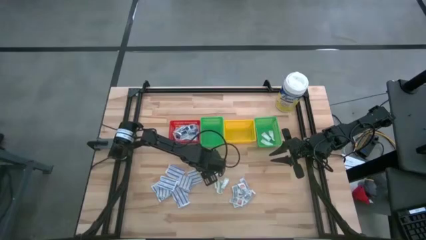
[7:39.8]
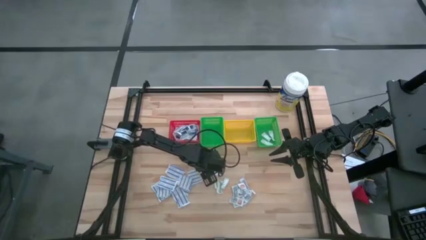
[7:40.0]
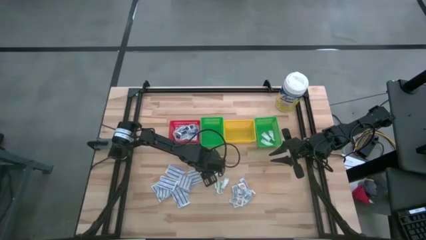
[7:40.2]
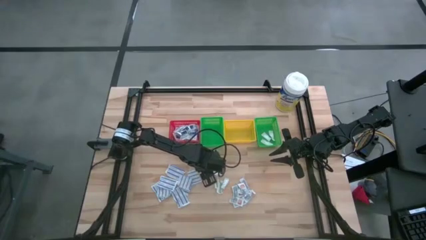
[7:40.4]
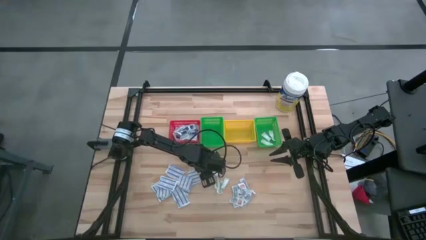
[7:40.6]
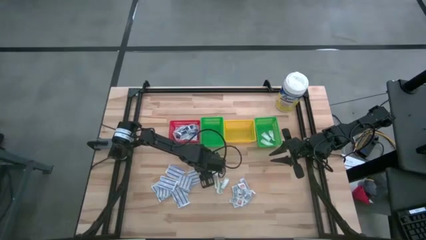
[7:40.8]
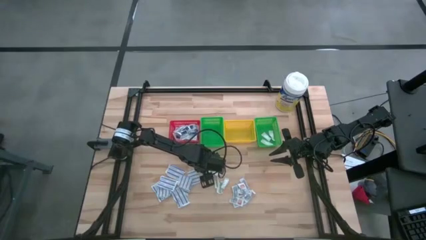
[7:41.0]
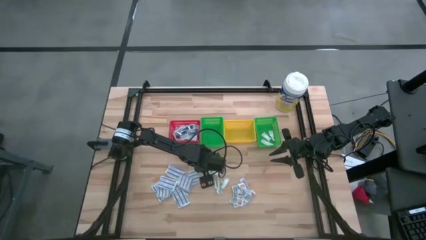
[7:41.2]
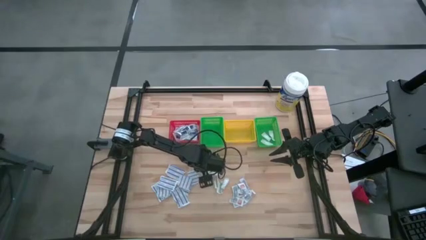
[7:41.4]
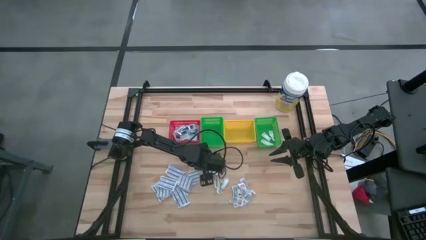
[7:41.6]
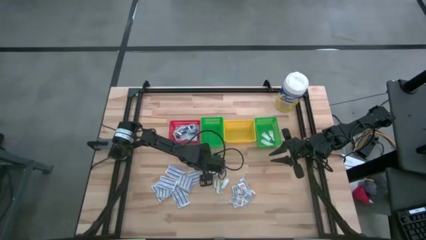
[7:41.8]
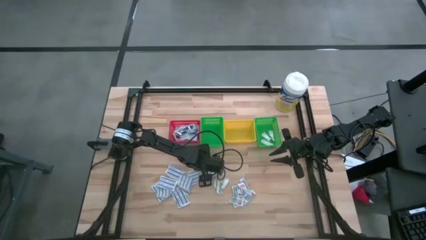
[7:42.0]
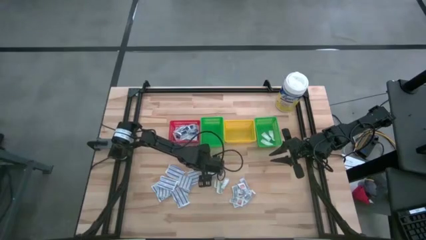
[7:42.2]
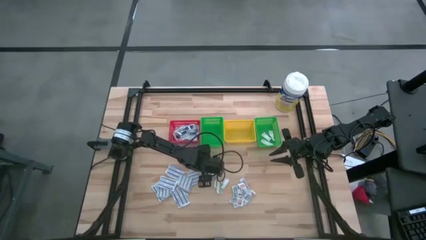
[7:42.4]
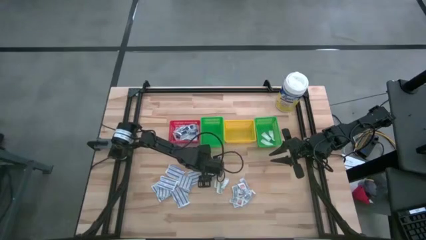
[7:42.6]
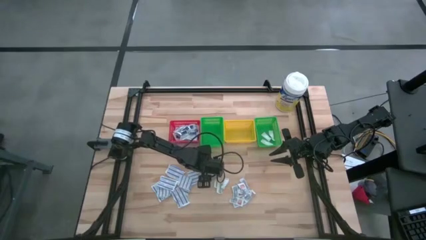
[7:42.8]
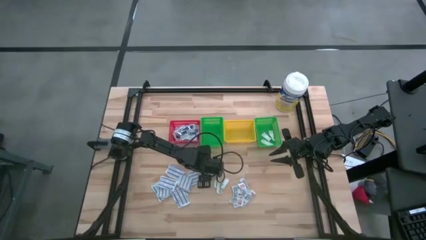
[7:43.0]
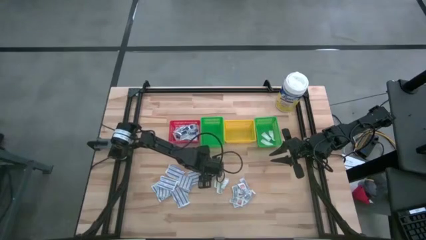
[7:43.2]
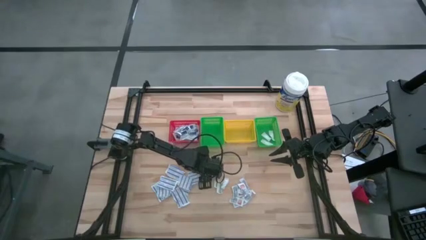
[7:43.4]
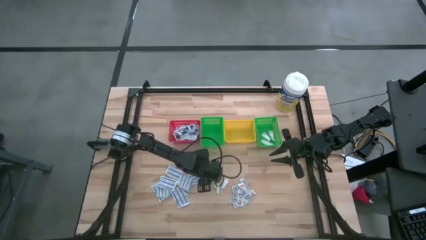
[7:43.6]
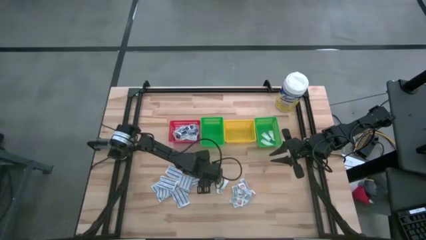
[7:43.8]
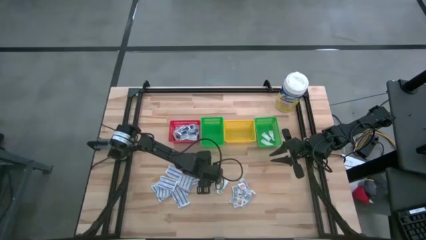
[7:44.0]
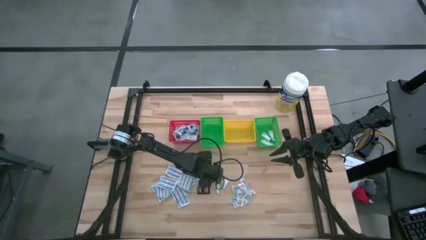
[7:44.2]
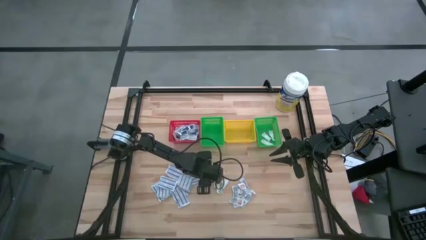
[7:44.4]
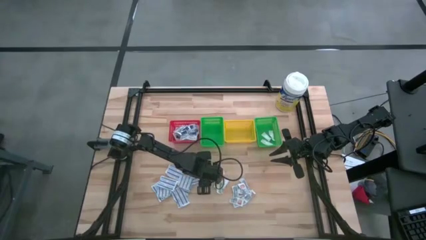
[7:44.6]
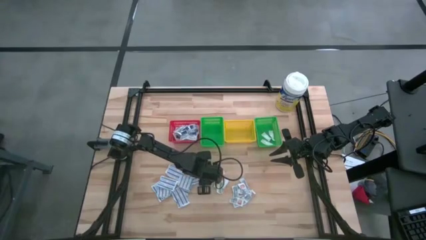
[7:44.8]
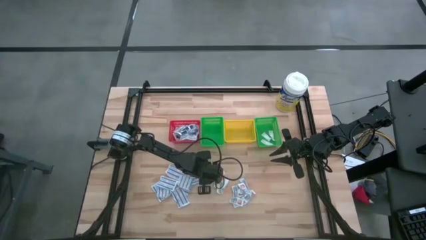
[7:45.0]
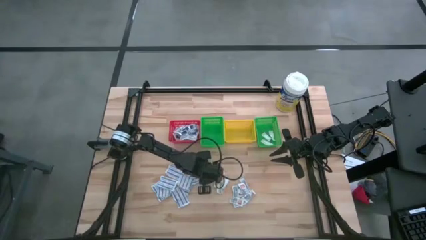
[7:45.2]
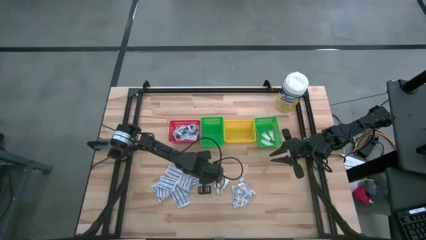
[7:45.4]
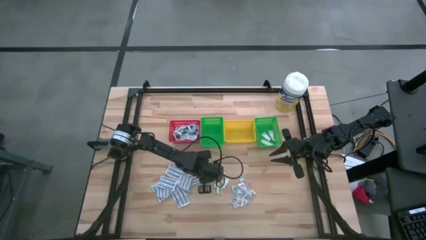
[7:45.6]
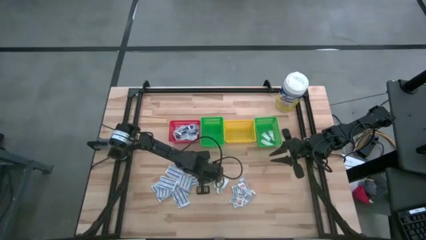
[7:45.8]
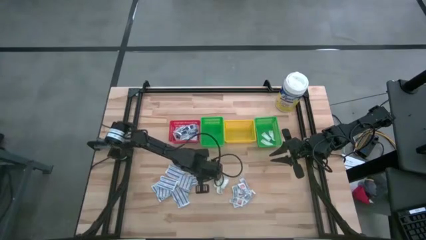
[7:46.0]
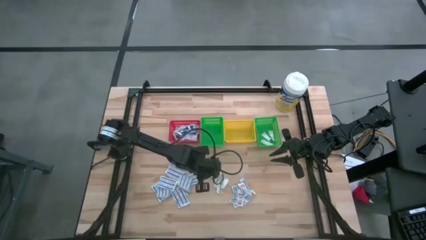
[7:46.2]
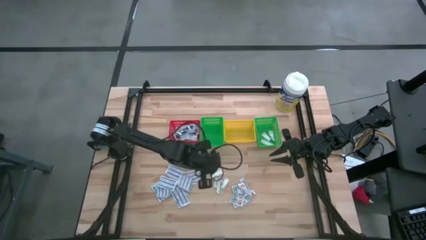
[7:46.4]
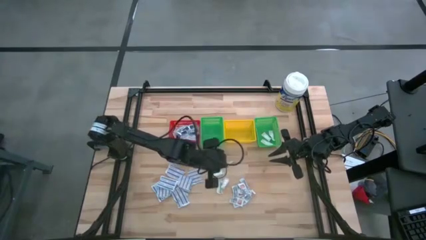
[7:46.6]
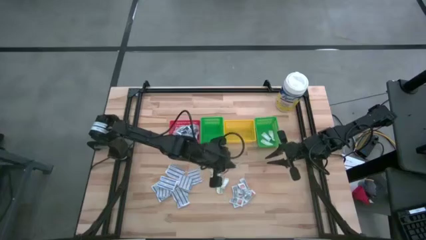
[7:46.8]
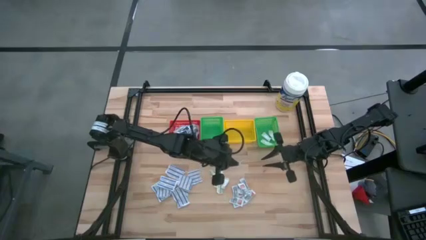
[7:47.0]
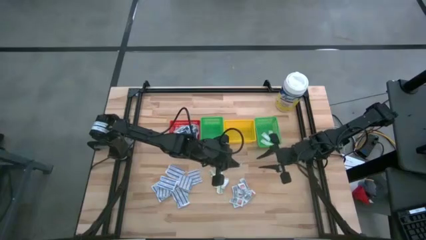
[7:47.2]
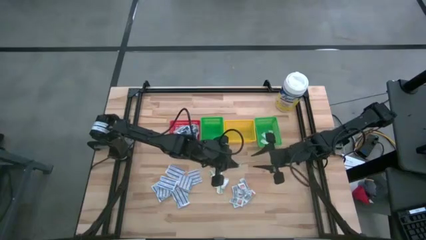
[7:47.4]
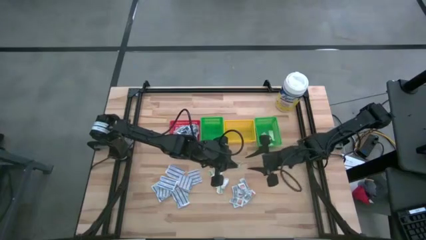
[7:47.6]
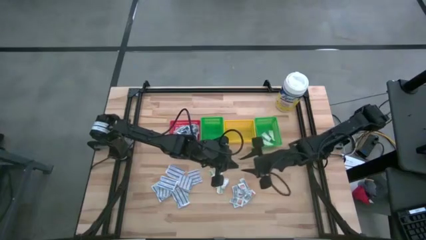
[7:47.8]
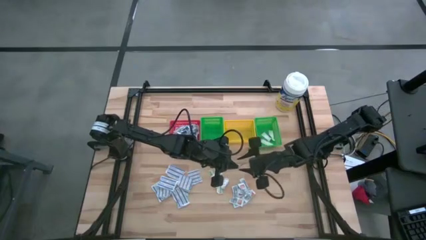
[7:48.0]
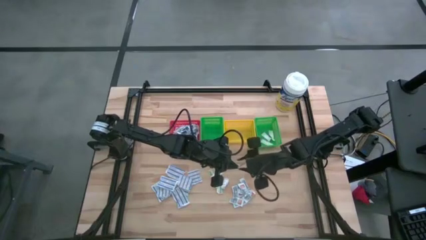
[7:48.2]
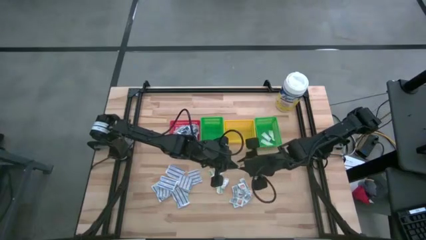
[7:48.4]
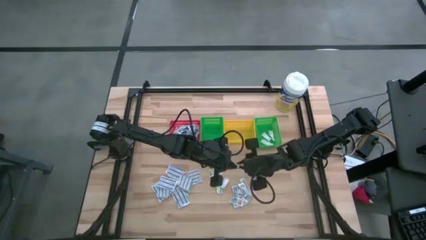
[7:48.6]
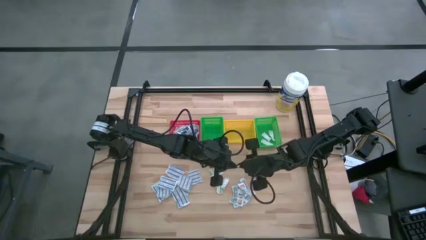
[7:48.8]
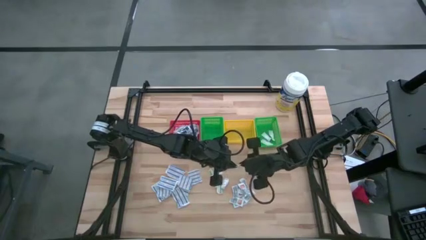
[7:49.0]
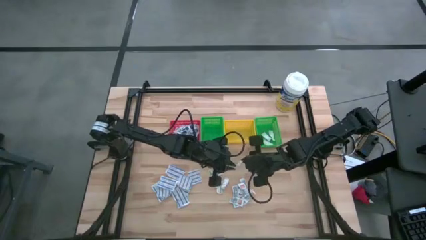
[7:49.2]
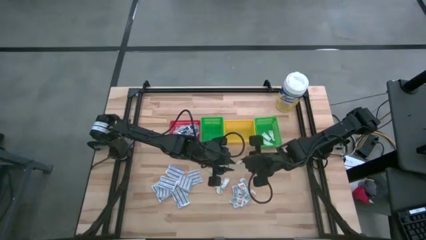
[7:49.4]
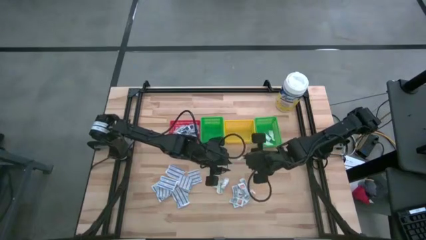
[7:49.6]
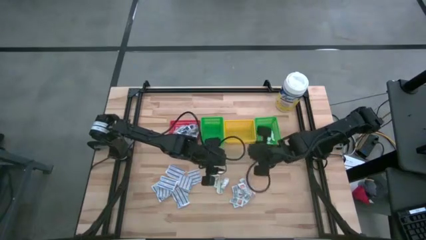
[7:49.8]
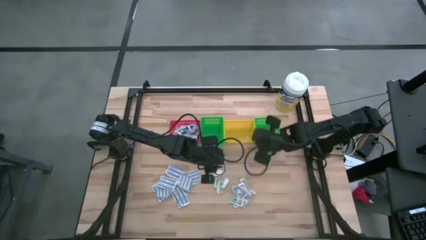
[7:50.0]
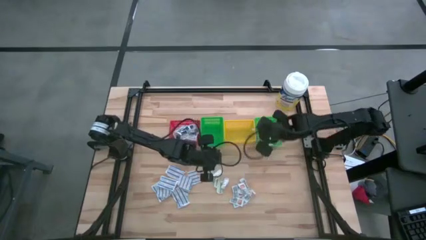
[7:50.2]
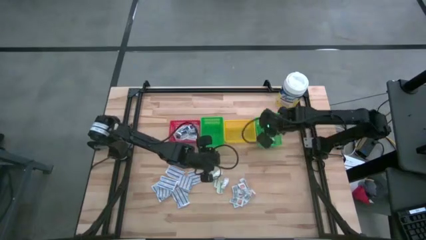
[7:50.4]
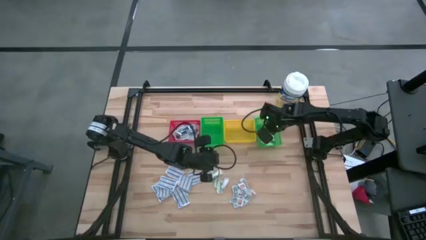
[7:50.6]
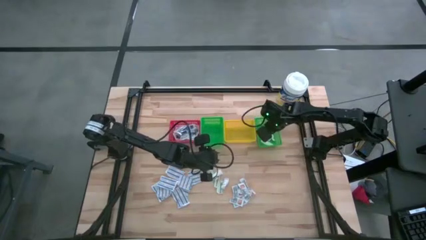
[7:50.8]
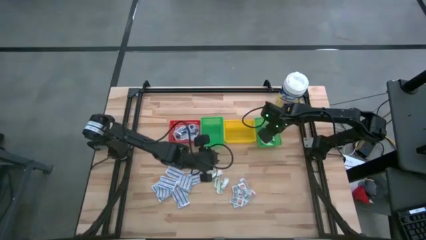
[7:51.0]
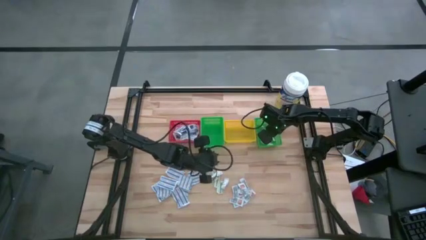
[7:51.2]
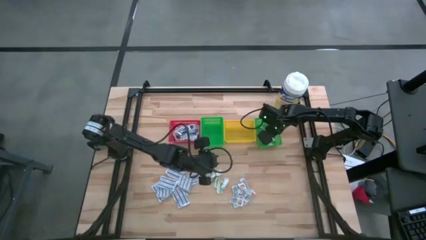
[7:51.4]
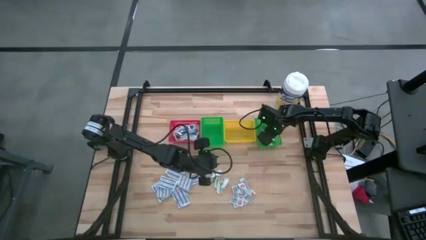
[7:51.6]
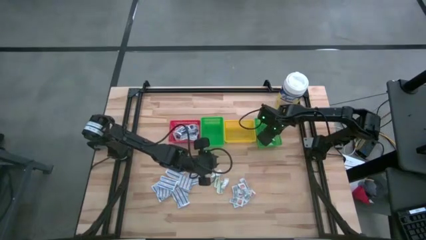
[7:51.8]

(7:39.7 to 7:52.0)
Task: Pick & Place First Aid Supplies
Put the green bandage into the right green basket

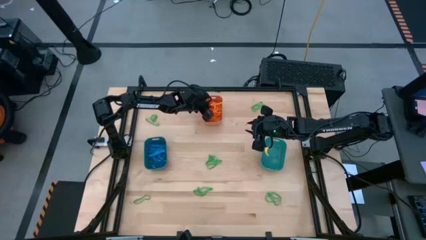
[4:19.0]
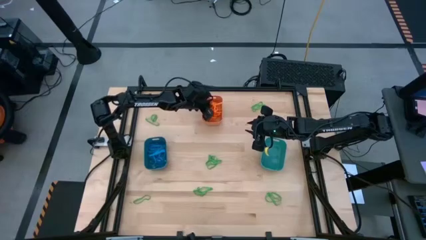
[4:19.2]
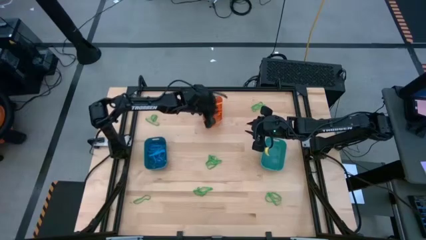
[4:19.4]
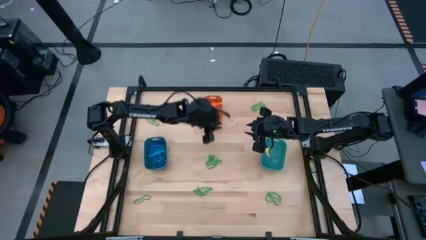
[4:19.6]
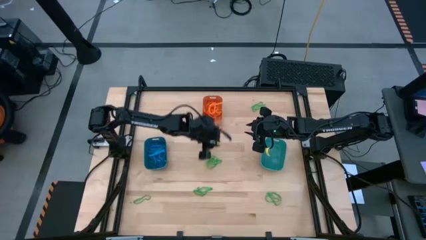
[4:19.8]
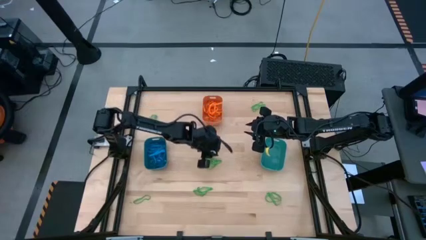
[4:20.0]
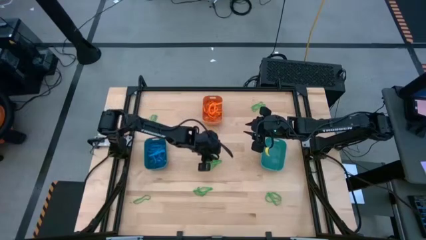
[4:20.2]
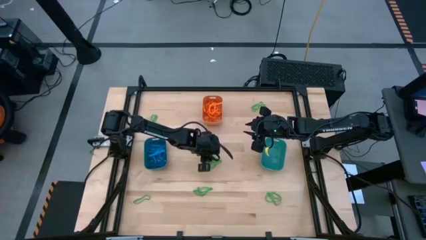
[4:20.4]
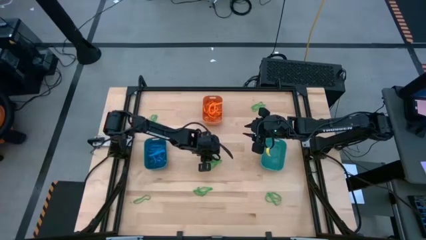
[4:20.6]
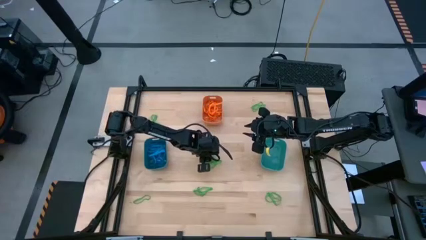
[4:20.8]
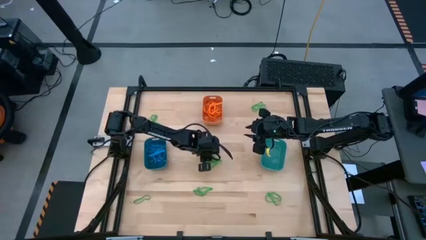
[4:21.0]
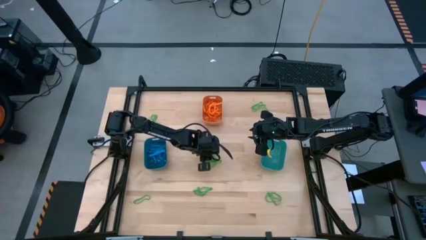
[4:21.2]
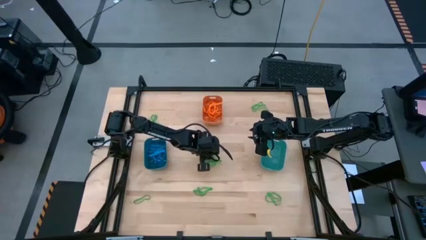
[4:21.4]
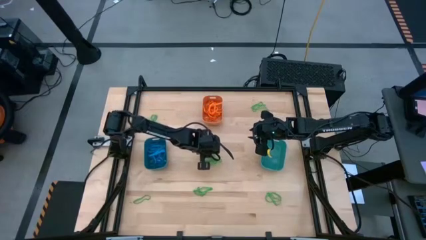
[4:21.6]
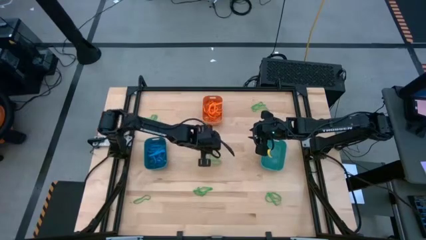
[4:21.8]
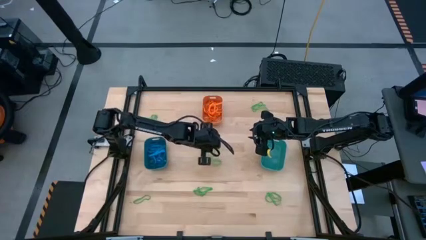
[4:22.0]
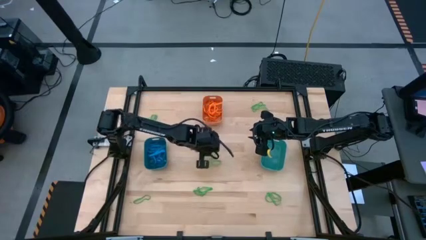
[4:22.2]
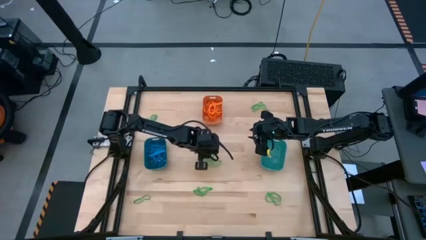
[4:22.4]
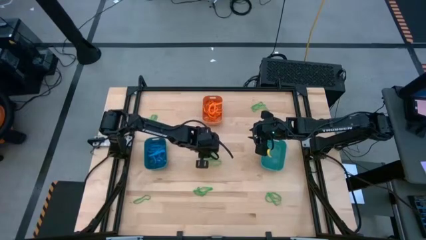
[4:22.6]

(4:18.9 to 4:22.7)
Task: Sort rubber bands into baskets
Put the green rubber band into the green bin
